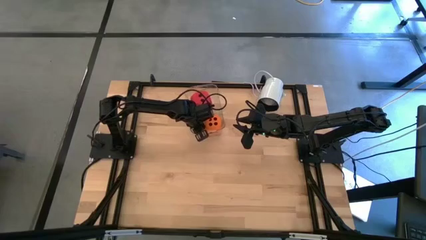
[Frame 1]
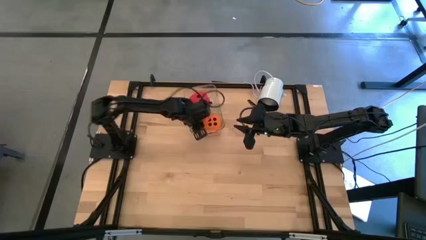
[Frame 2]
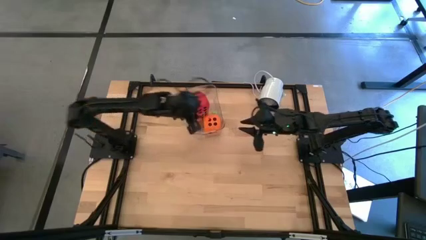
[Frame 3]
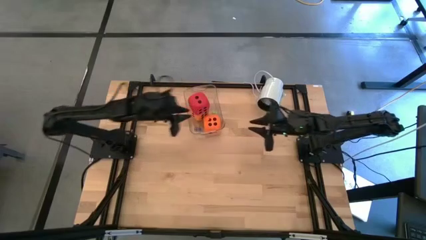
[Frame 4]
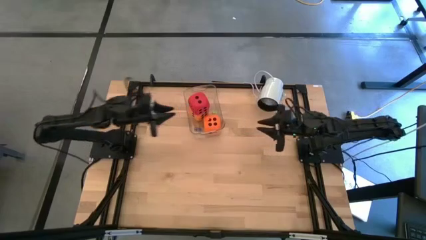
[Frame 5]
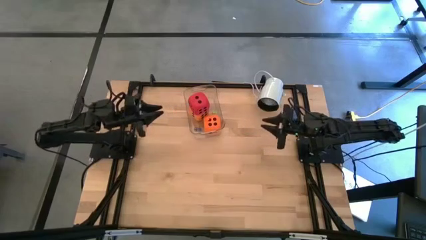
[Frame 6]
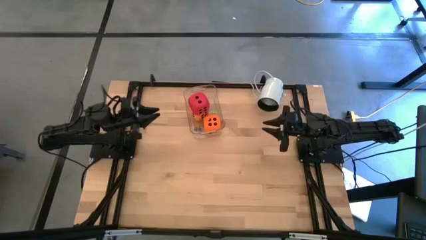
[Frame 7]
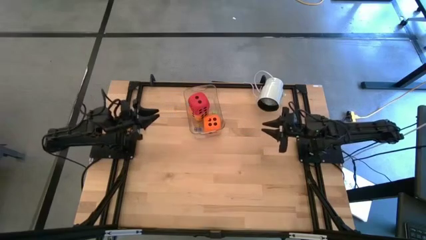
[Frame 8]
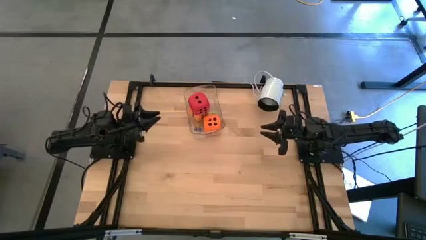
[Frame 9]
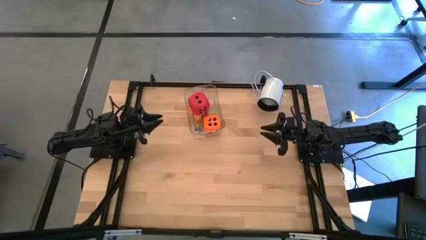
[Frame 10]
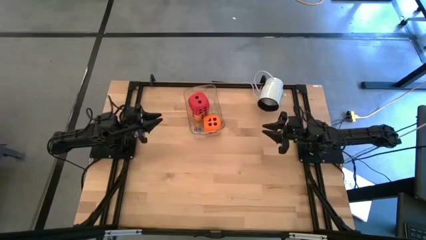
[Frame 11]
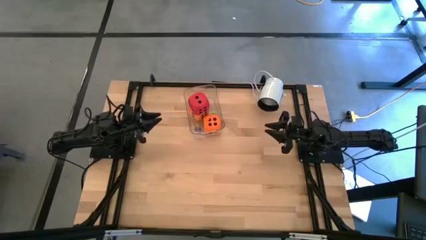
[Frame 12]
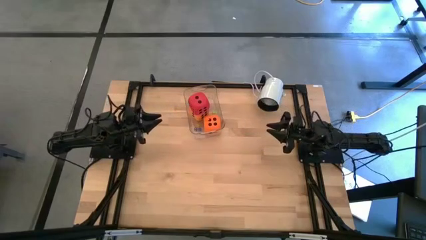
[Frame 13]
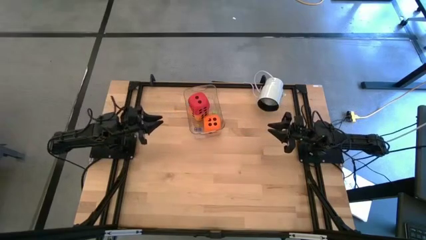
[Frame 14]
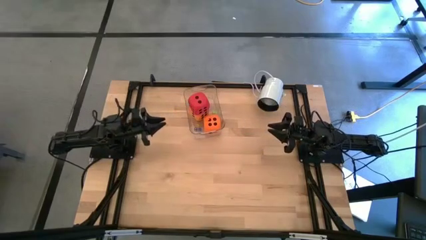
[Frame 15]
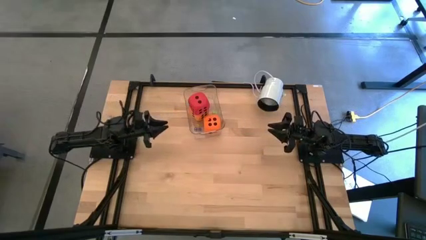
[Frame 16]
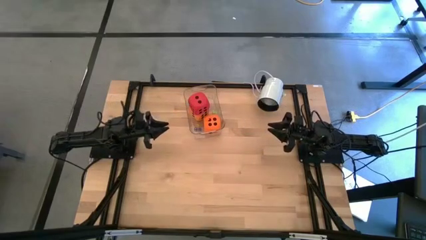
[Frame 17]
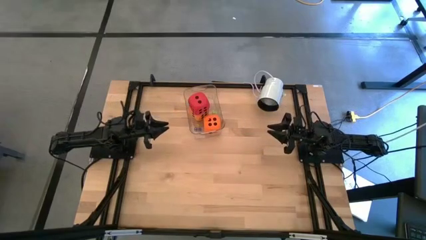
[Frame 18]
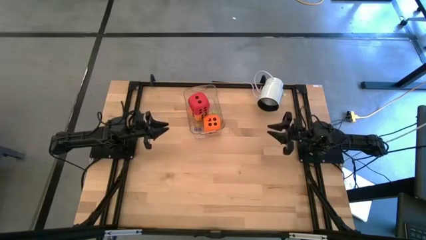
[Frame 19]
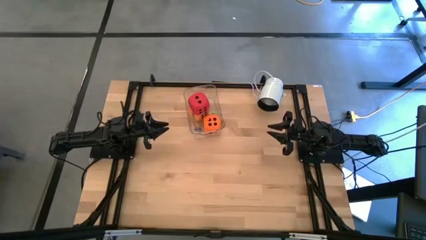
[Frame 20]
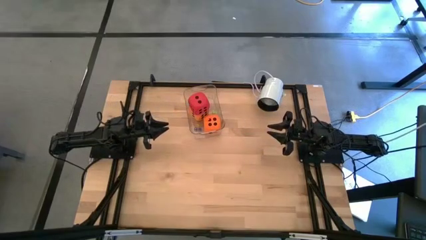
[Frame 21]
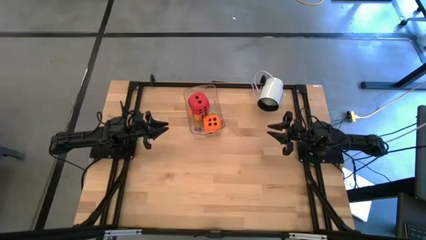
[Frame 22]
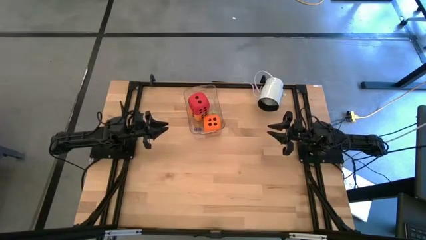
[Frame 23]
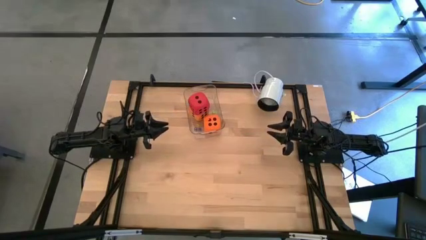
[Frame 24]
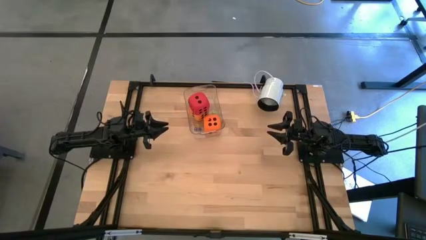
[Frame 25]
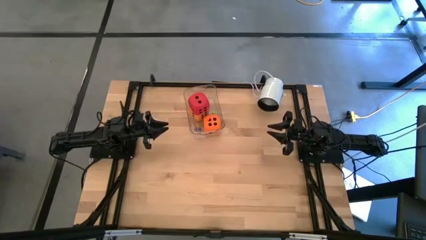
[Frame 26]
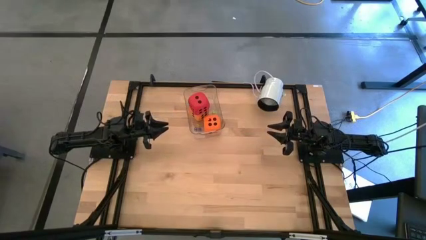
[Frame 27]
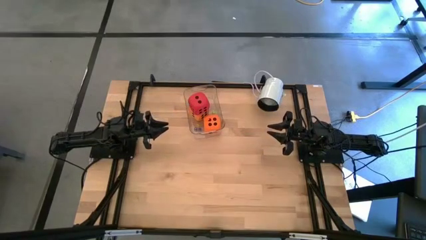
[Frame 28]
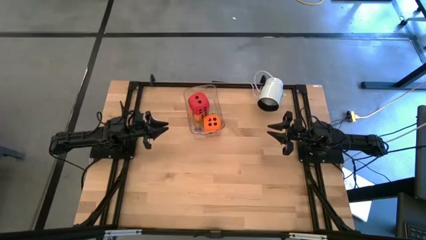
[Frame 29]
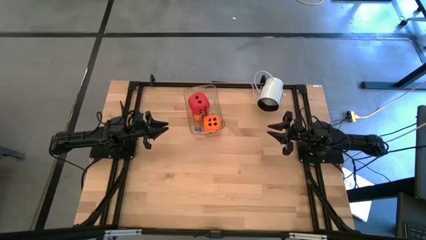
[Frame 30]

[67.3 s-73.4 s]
Task: Pick & Place Dice
Return to Home Position

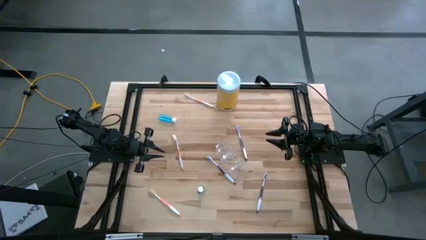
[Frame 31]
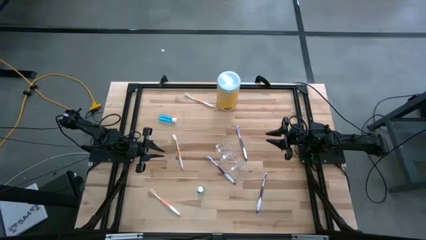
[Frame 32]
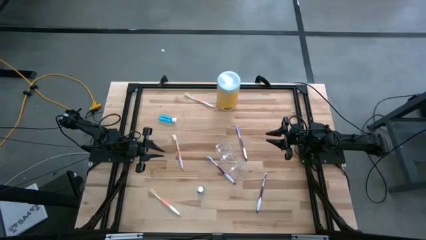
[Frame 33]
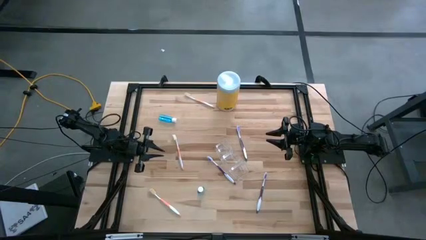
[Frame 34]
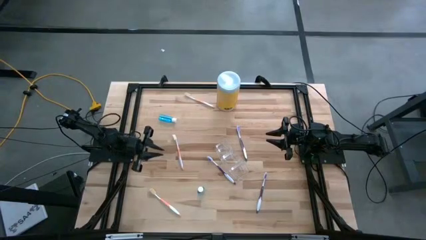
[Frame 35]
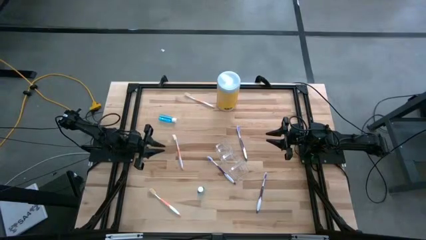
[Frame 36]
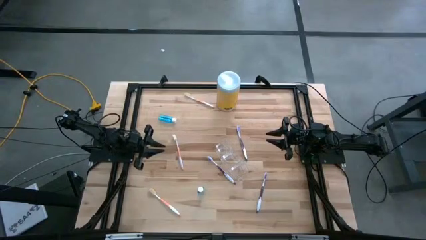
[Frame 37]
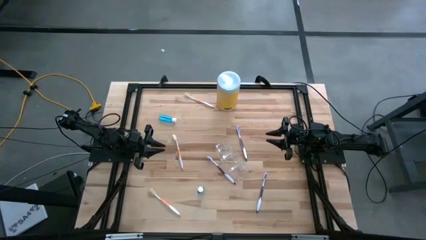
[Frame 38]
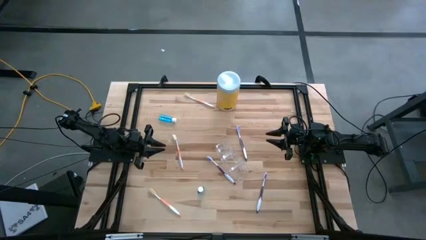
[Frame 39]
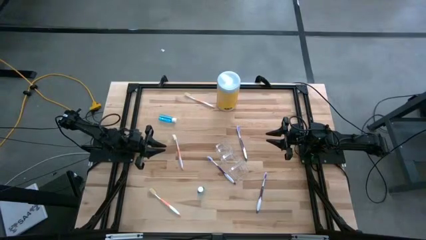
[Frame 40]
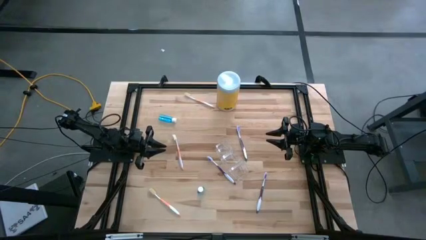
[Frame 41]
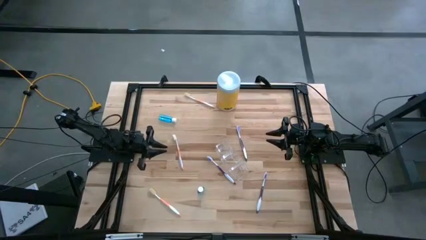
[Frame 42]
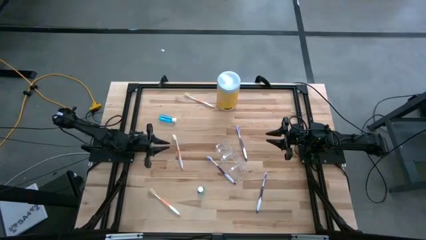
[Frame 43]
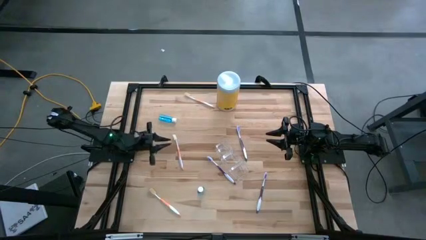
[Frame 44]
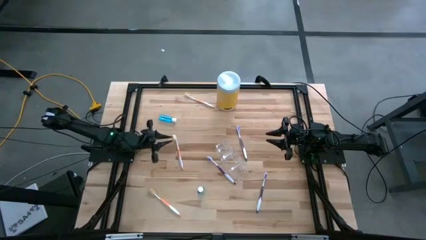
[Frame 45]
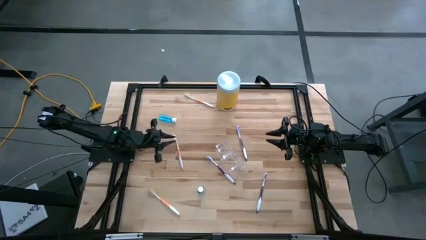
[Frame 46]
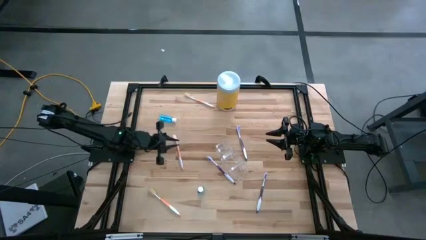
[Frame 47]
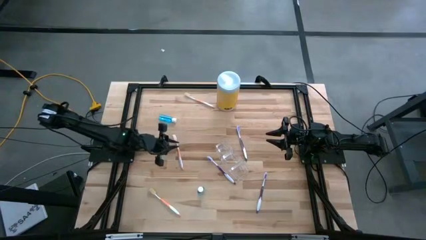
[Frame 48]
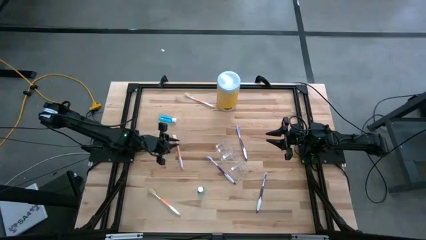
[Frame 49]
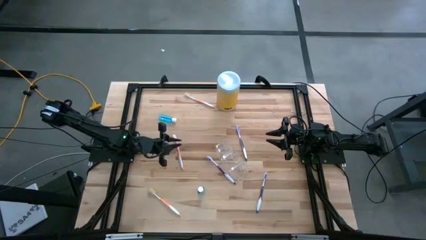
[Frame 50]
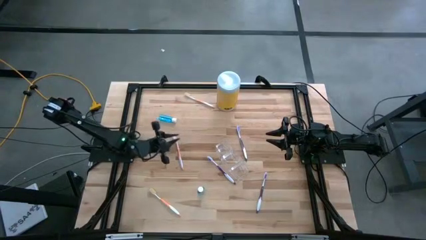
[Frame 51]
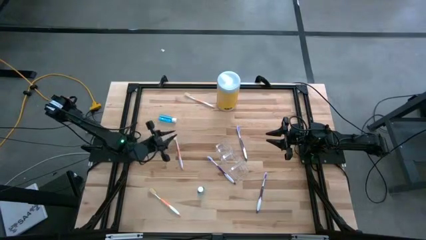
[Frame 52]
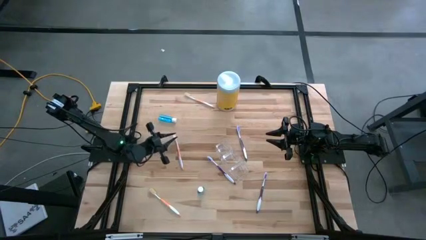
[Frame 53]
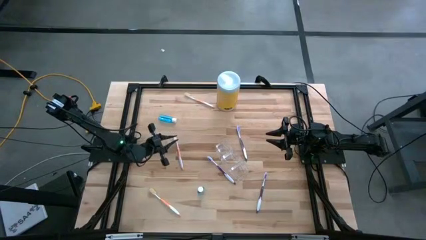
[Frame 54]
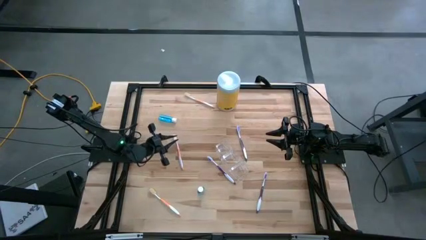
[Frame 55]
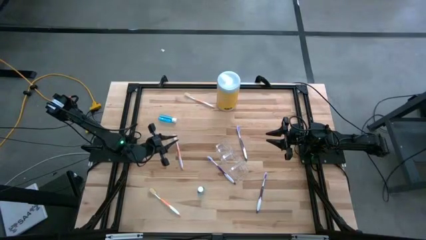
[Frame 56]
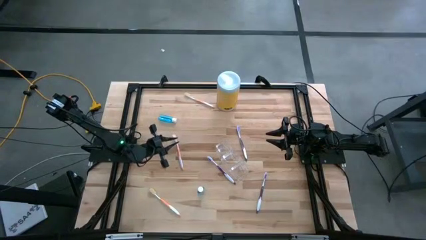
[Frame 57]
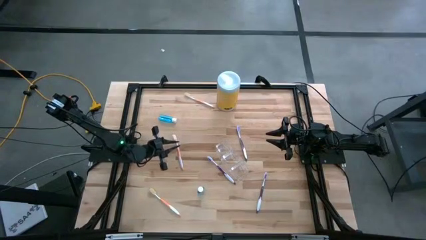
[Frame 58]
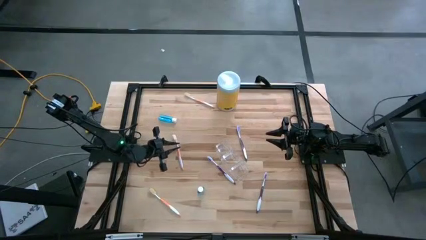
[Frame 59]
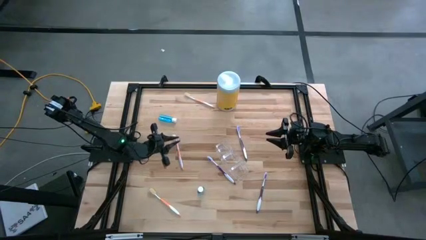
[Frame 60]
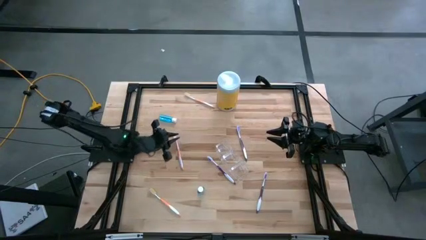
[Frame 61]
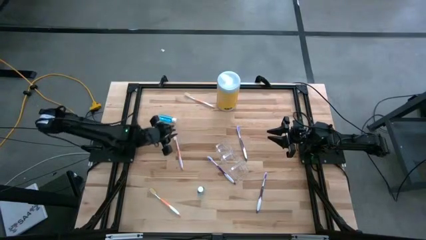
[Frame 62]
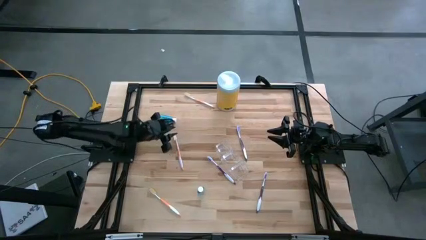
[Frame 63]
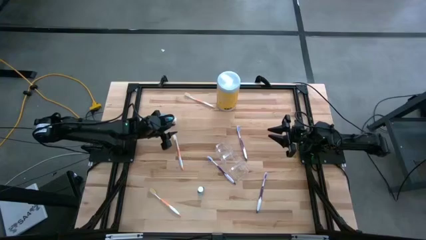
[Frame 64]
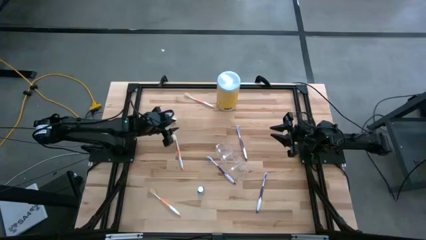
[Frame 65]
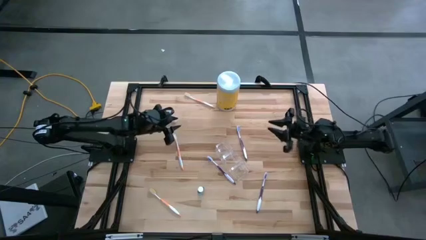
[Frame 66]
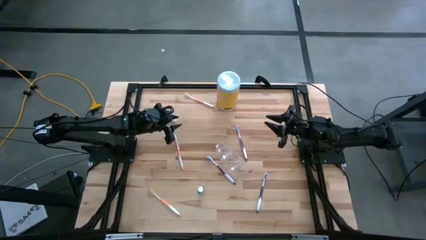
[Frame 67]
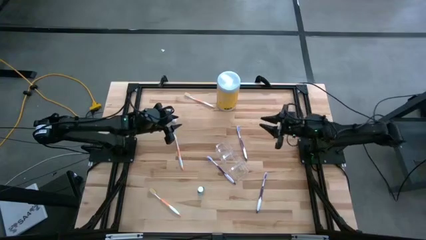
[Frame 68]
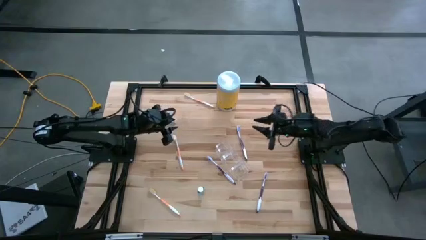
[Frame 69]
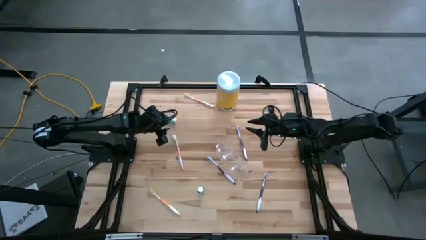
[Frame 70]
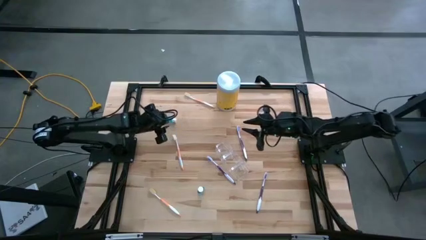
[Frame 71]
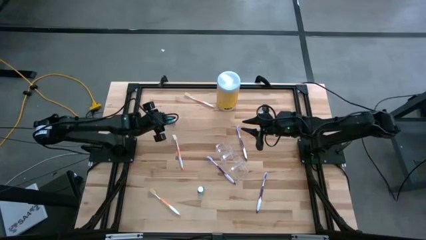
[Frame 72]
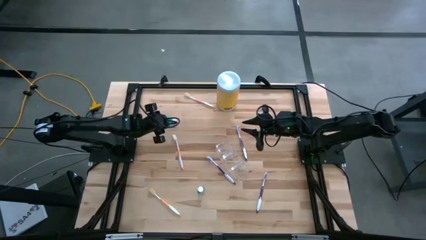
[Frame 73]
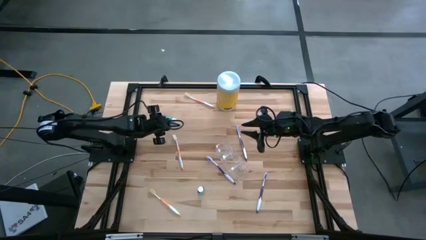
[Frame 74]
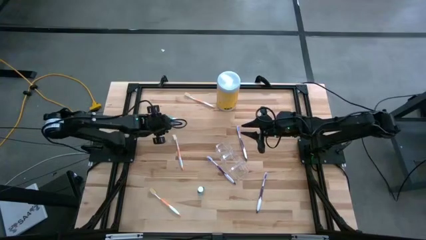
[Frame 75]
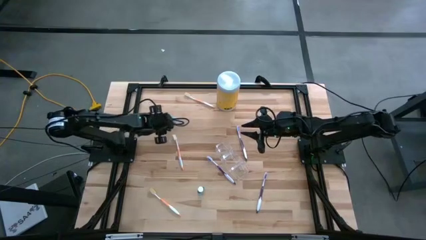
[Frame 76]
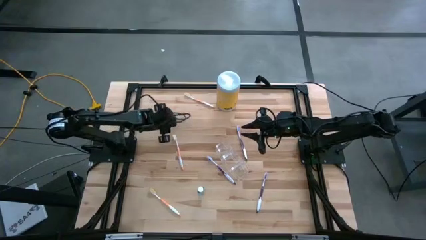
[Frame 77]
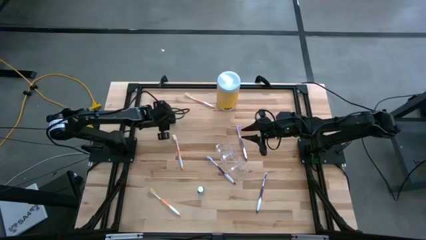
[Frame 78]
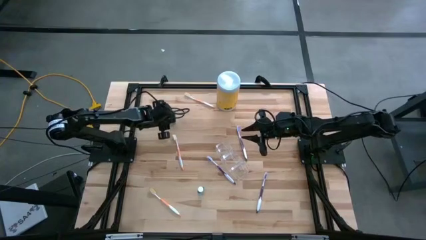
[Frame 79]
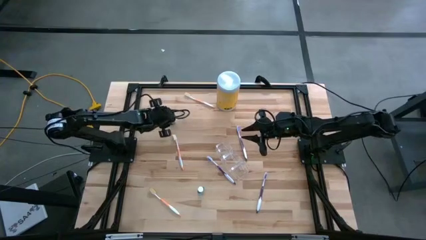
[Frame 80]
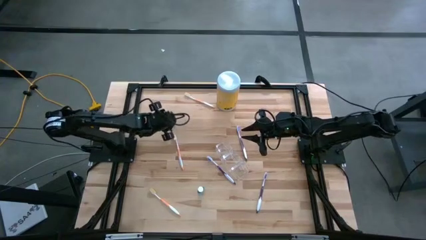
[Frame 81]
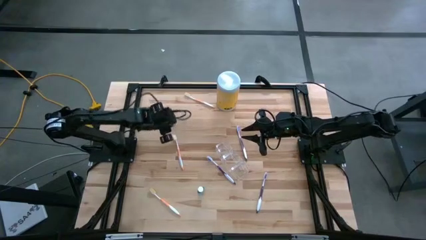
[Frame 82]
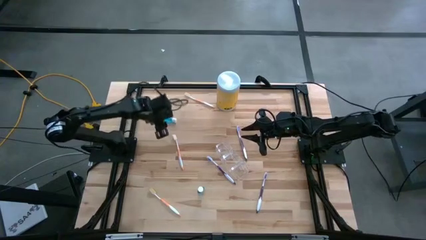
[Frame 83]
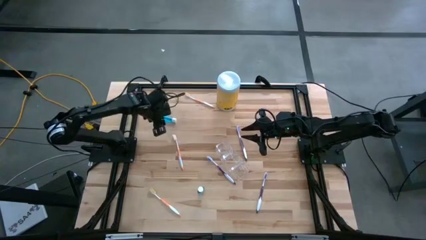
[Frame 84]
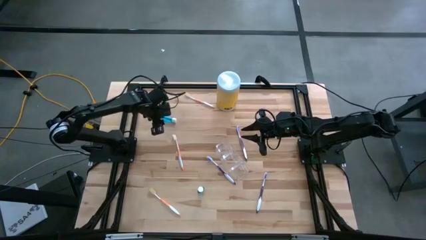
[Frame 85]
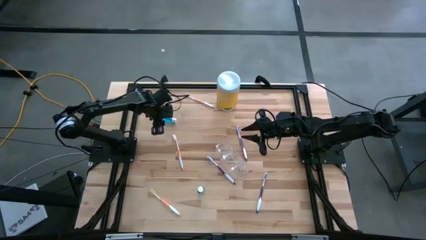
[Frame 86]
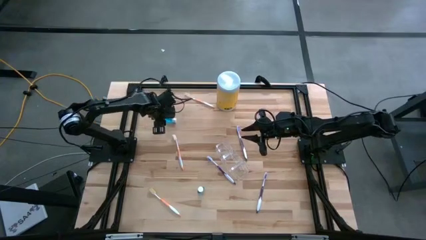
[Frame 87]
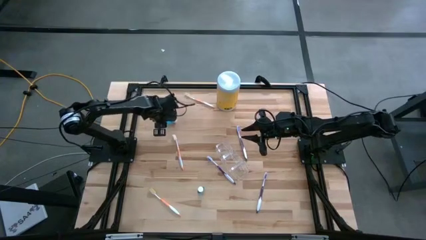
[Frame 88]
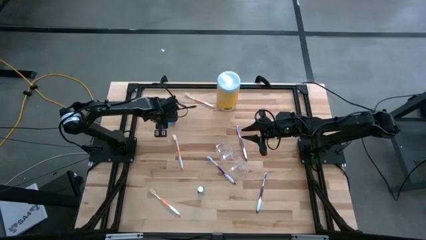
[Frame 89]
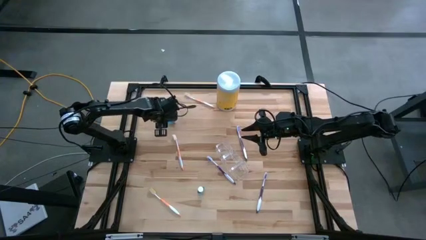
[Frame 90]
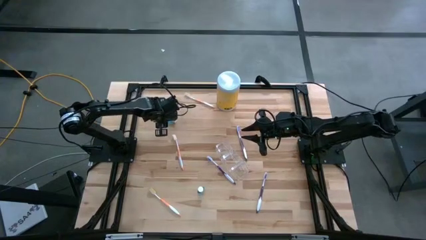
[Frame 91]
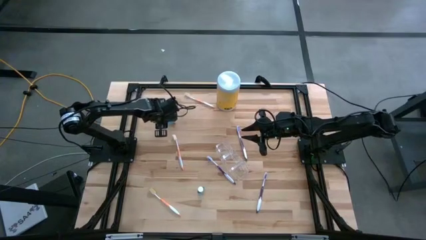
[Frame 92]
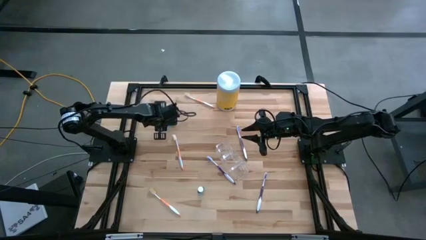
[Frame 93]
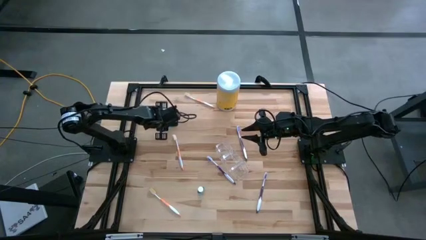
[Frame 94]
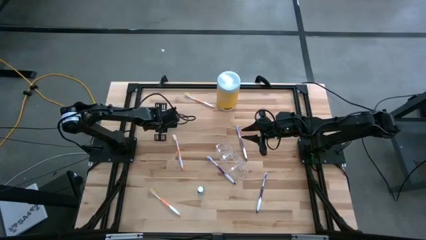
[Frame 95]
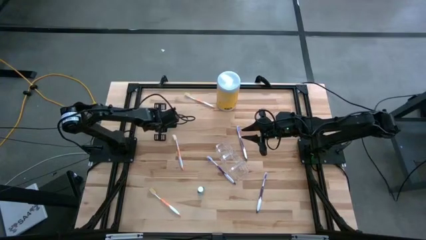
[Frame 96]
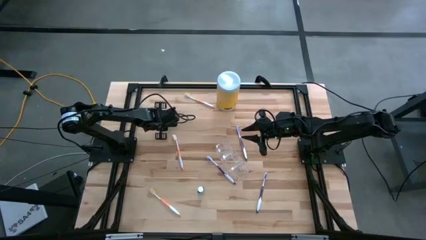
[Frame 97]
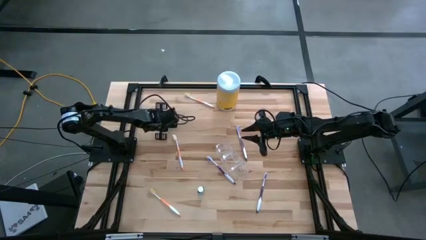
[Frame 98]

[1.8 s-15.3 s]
Task: Pick & Place toothbrushing station
Put the top mouthwash into the transparent organizer
